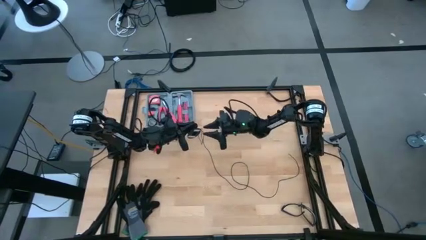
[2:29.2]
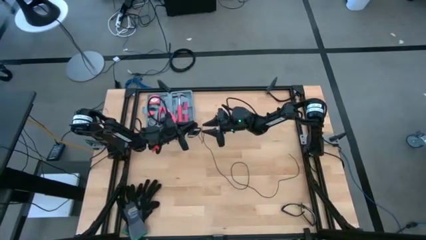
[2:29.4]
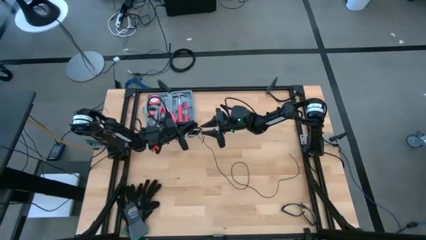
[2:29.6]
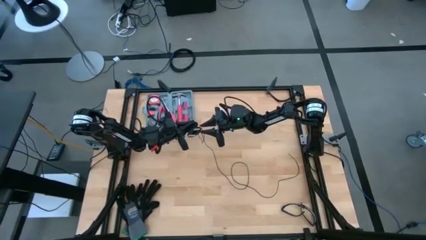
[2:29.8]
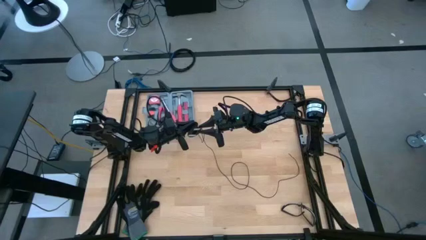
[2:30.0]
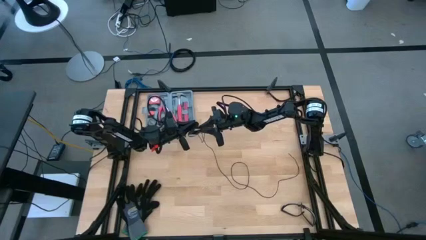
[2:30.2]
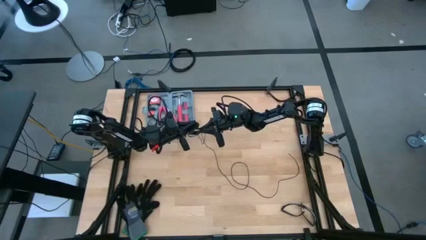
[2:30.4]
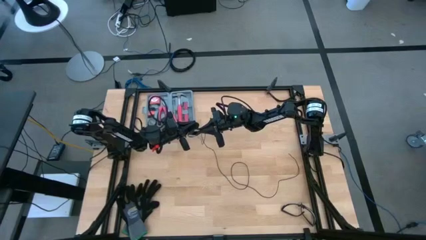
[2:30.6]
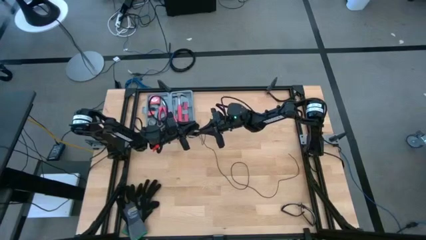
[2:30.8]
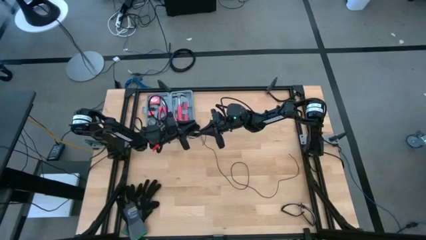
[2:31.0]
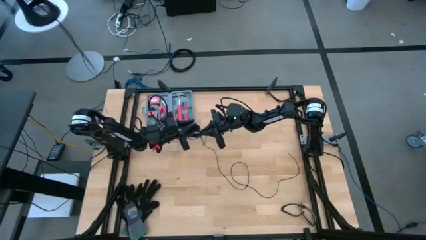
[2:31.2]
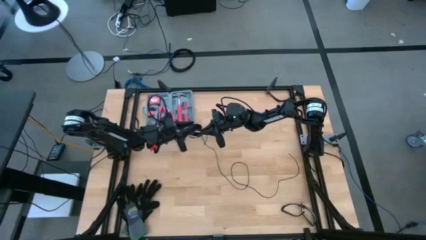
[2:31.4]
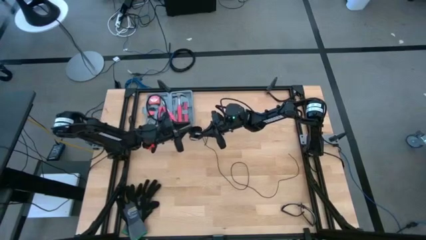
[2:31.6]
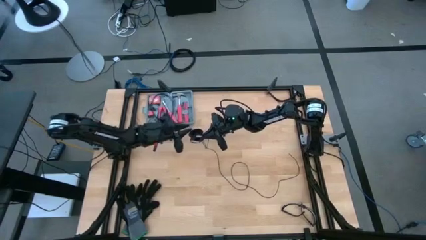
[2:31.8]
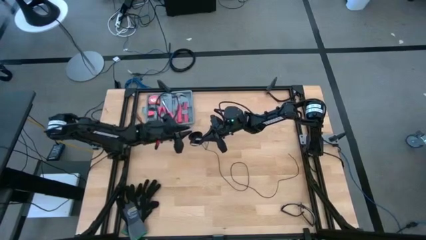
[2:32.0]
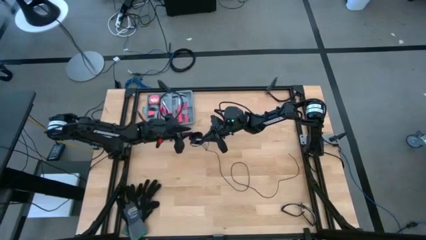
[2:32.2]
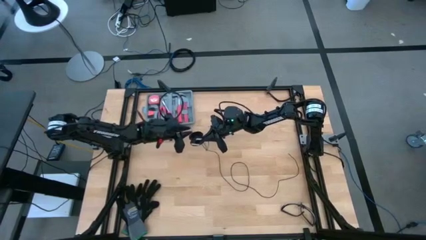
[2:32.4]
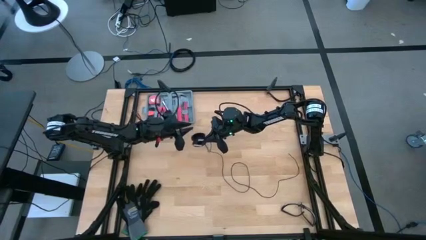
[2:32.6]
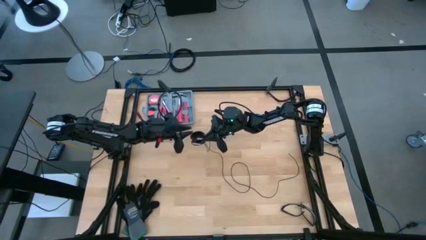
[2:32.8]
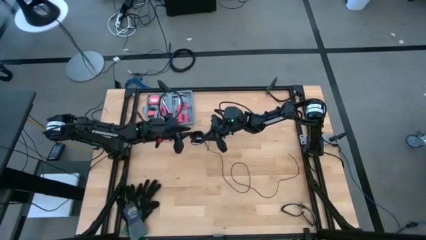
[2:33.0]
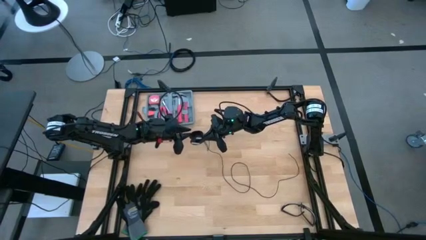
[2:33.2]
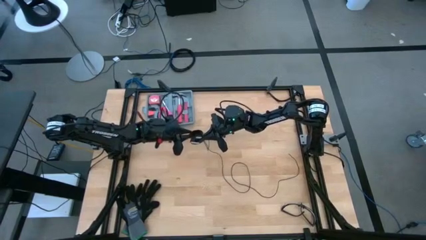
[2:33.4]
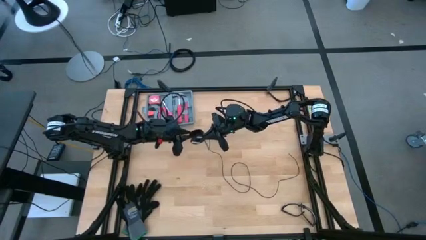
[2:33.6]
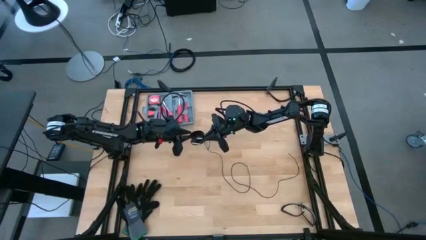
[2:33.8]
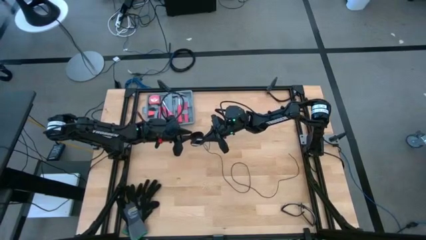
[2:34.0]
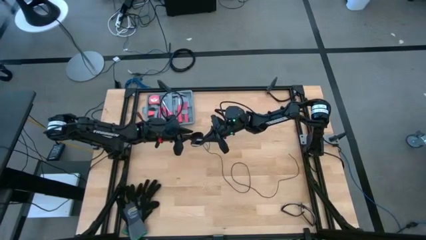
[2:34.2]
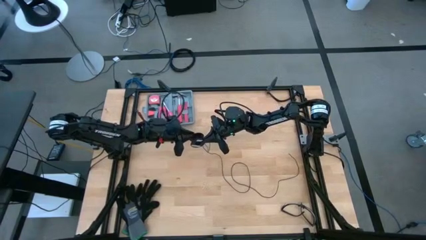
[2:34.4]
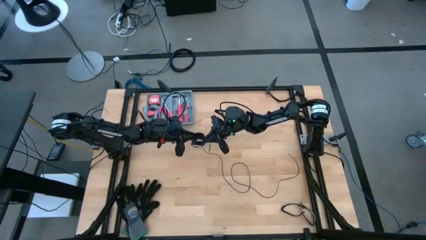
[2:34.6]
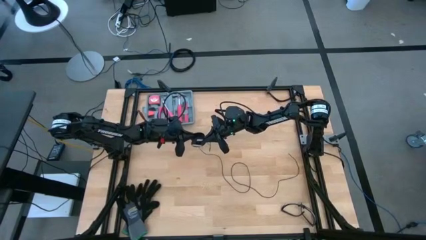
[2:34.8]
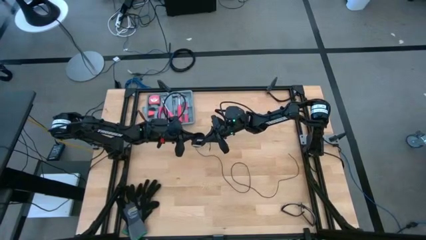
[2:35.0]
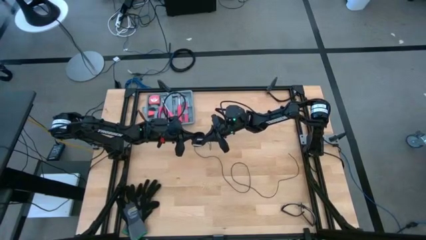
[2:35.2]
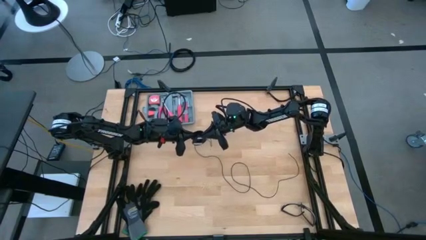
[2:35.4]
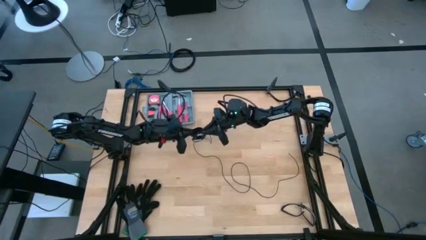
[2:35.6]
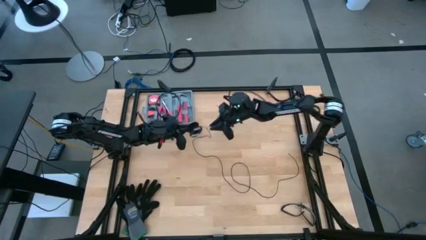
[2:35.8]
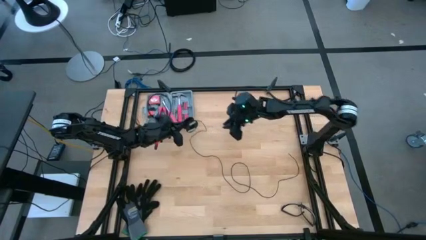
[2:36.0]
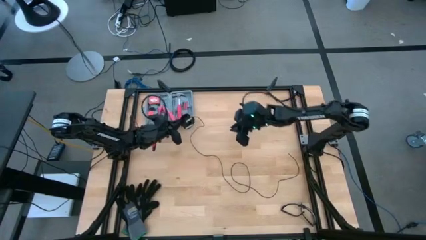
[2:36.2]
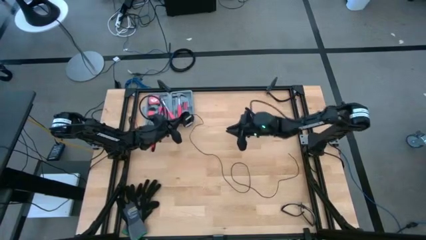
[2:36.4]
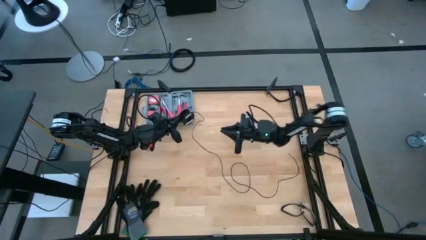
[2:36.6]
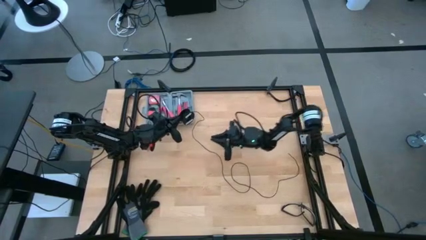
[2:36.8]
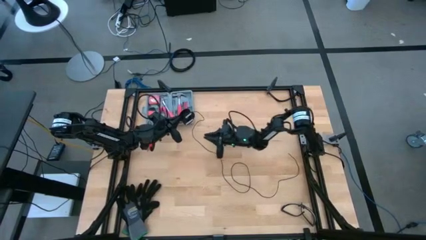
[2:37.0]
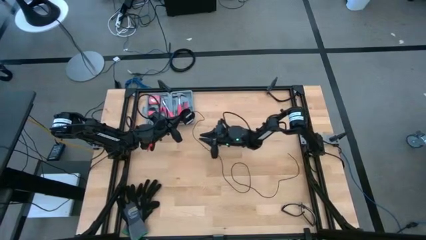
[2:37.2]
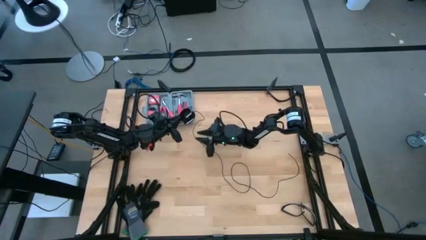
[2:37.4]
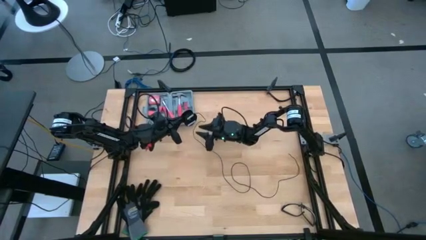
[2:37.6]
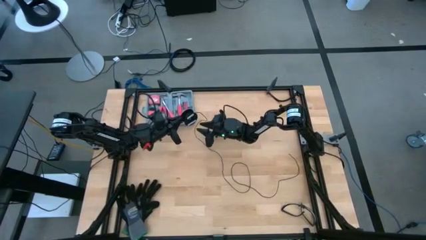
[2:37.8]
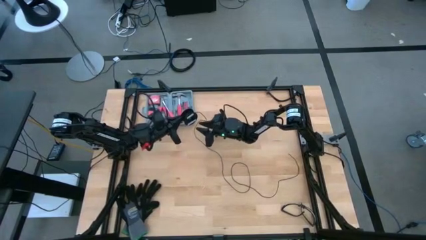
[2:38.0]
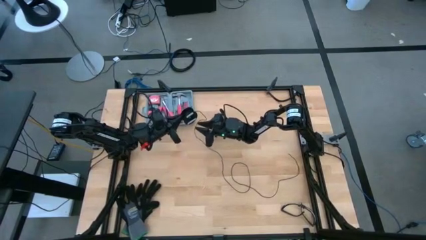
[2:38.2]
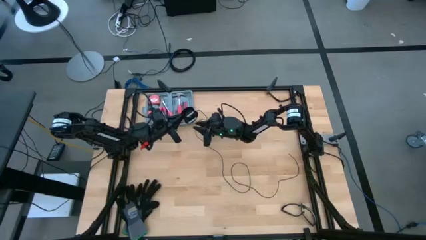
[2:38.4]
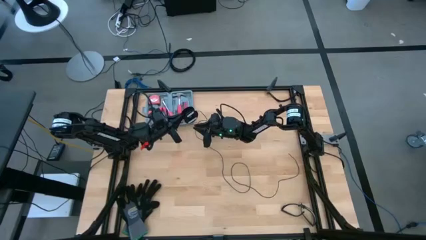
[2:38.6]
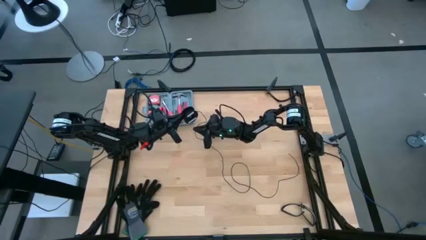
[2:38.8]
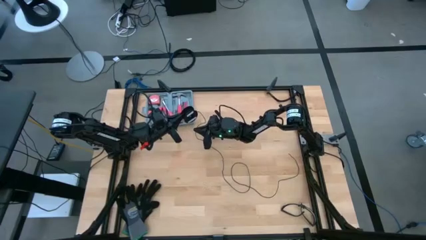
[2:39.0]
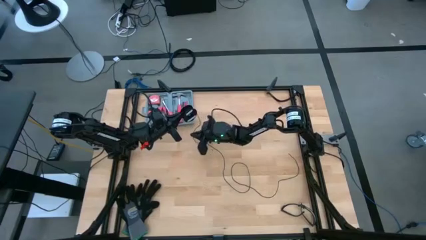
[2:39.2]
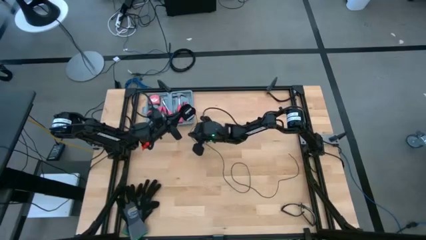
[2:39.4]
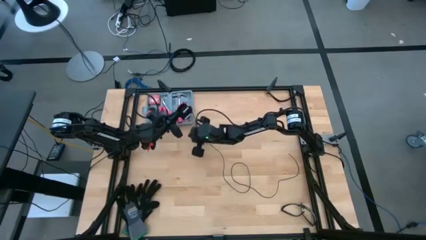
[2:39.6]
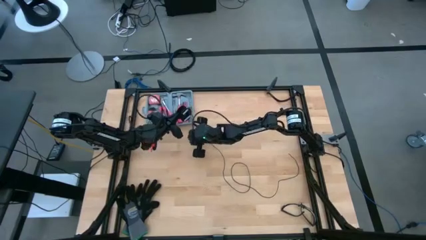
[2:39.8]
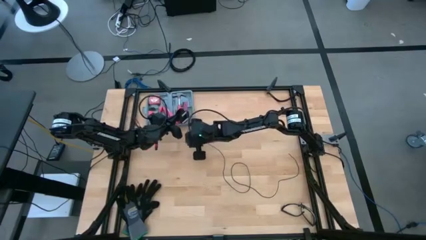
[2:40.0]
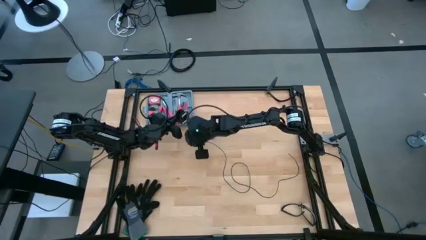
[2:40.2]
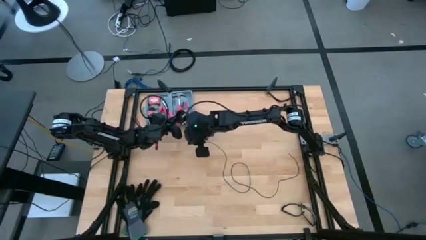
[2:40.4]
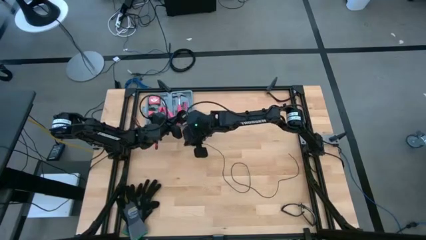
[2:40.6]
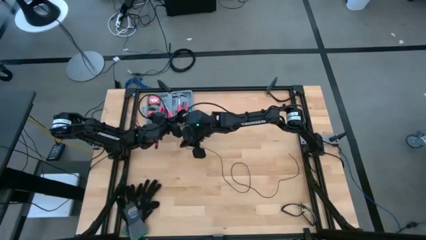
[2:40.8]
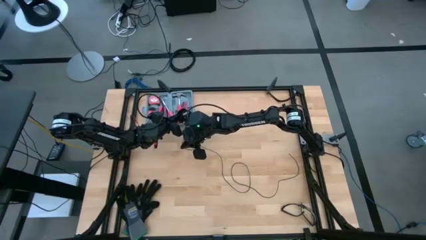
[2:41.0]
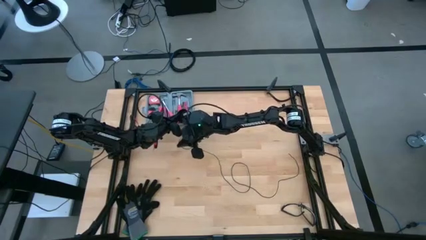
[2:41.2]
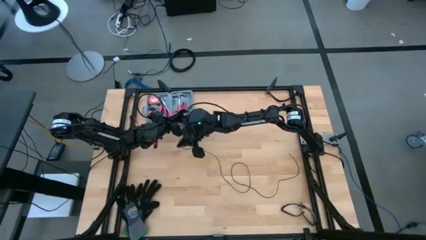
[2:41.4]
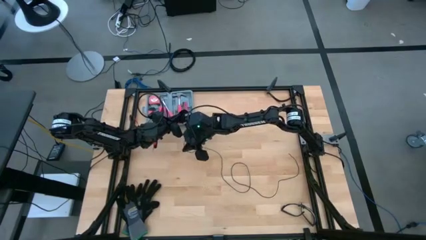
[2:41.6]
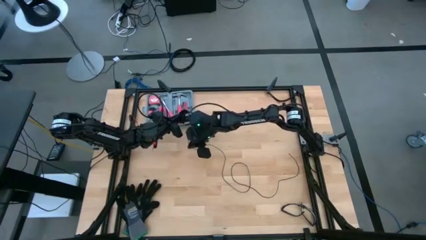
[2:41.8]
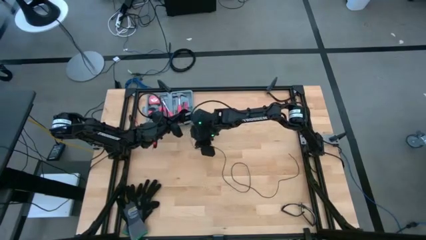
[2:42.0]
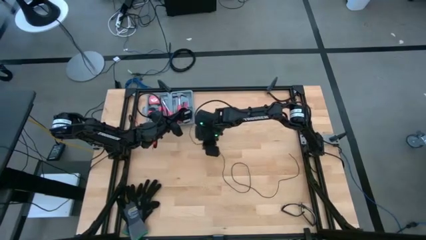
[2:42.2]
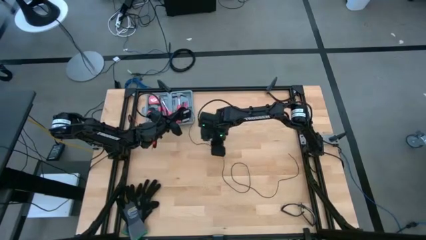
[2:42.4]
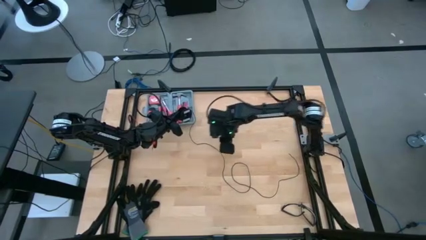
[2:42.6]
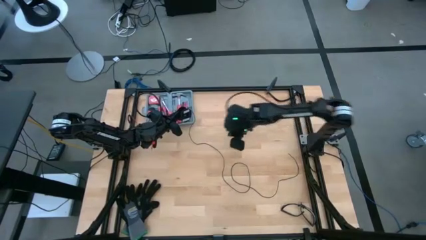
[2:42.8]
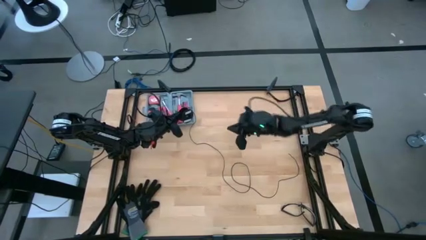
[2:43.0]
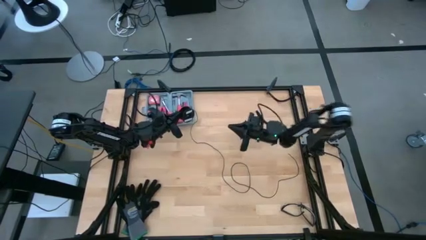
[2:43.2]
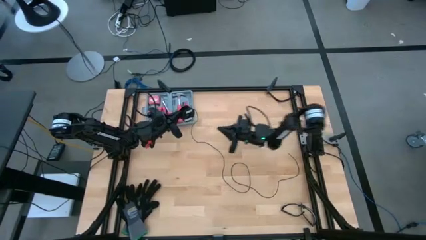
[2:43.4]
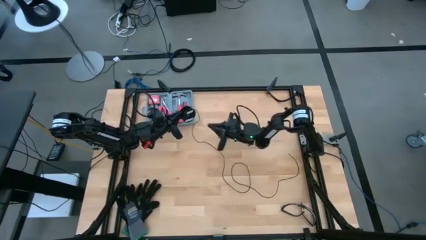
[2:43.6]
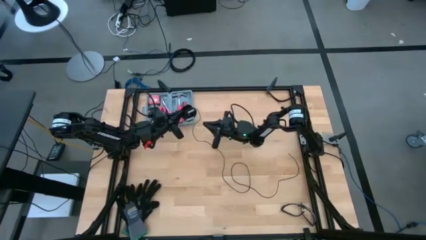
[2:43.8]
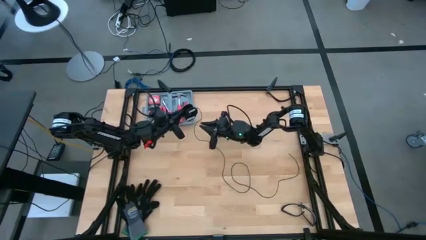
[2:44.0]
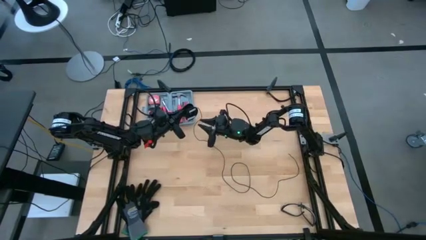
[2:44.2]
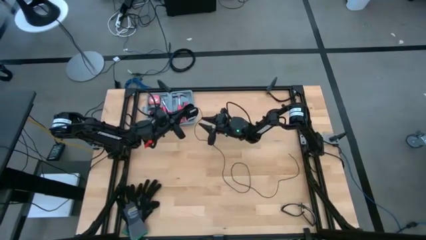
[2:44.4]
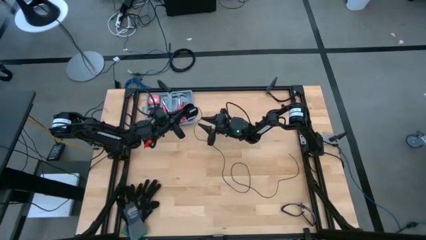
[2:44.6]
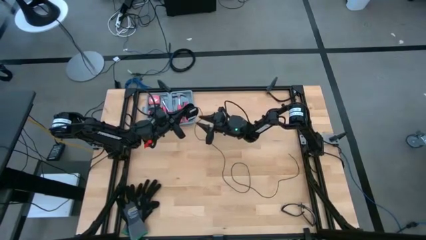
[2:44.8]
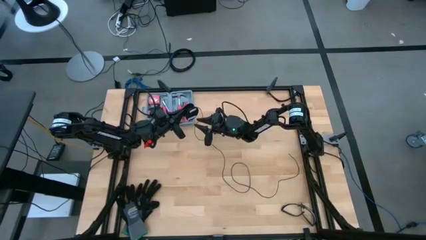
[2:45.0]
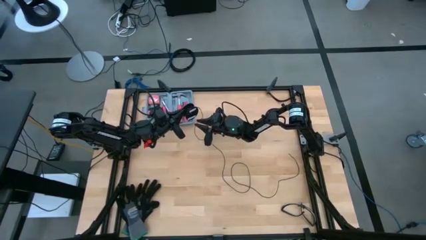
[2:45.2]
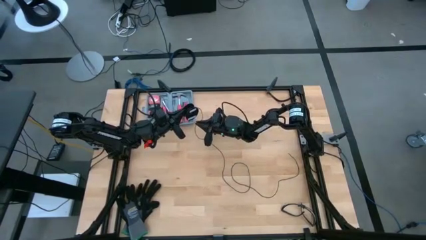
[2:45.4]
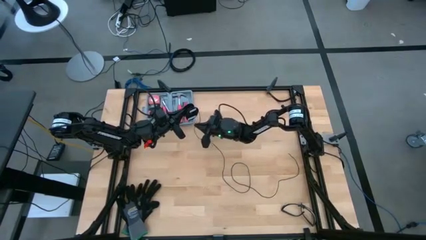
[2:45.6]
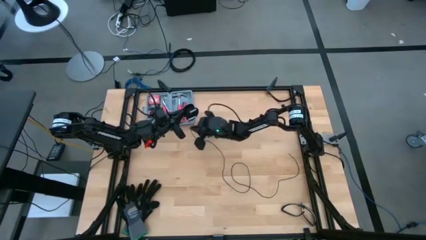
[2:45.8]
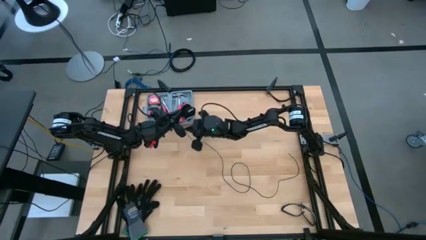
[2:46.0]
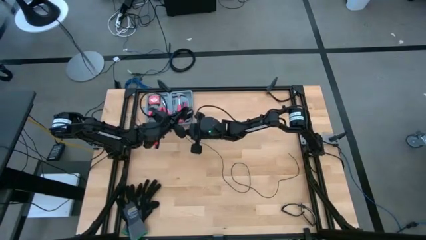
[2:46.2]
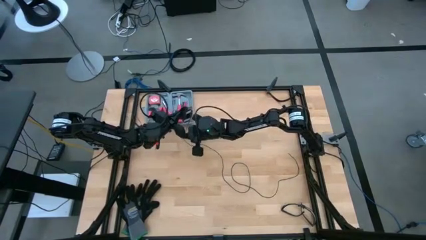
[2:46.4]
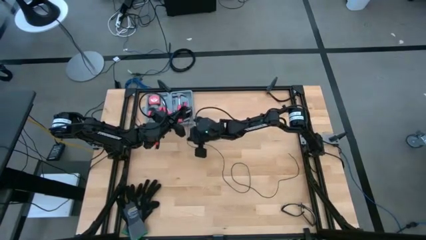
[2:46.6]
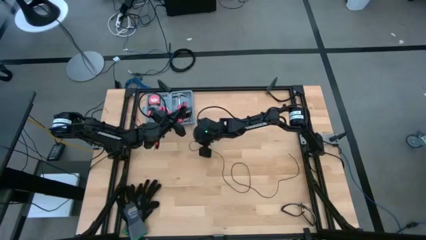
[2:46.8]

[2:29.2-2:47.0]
Task: Coil cords
Coil the black wire onto the spool
